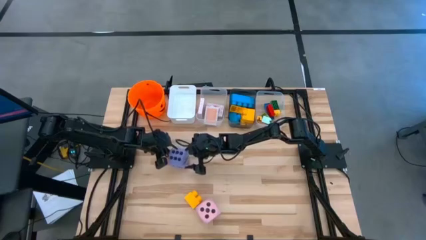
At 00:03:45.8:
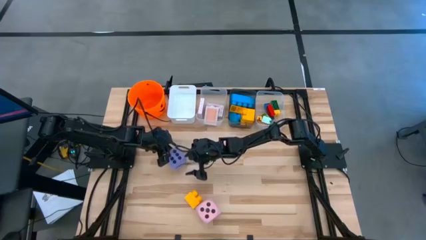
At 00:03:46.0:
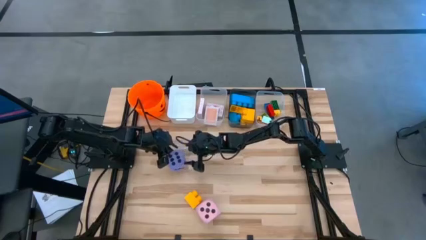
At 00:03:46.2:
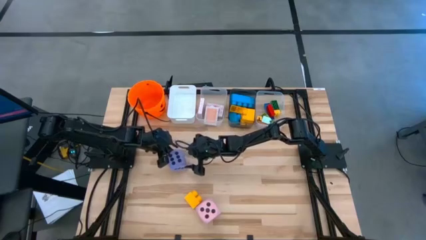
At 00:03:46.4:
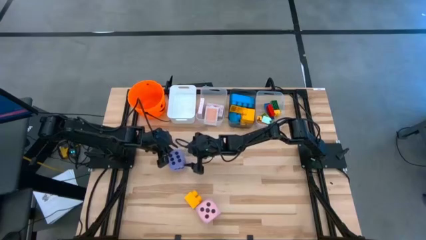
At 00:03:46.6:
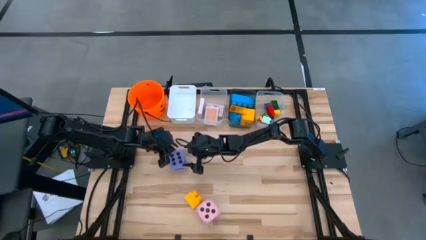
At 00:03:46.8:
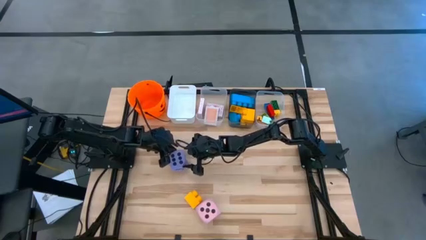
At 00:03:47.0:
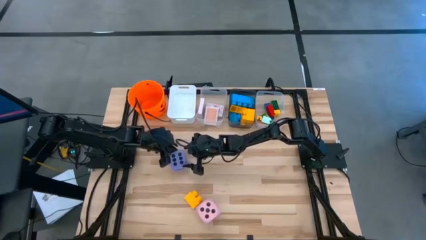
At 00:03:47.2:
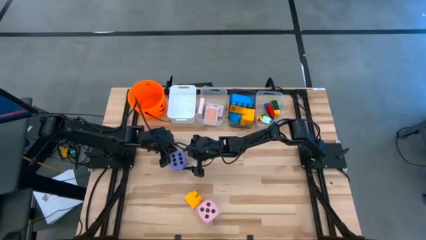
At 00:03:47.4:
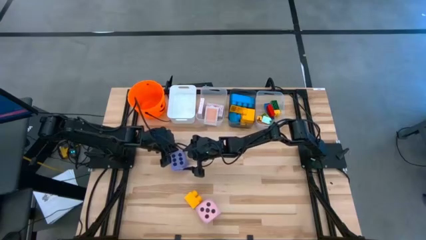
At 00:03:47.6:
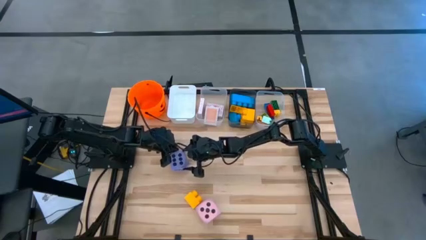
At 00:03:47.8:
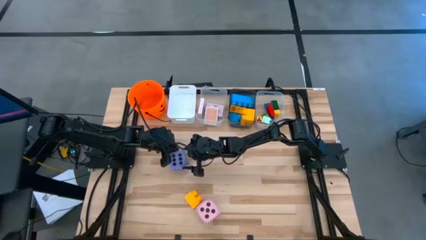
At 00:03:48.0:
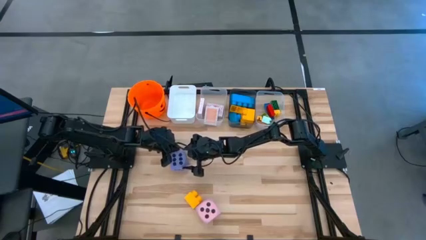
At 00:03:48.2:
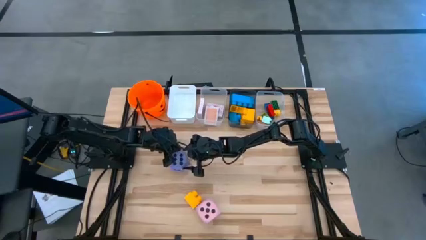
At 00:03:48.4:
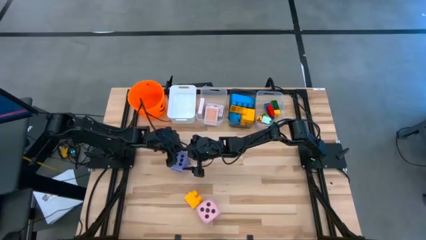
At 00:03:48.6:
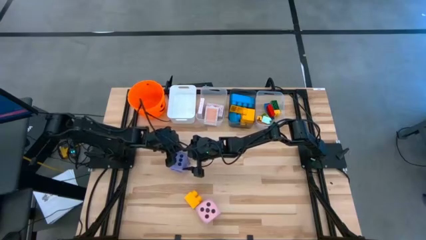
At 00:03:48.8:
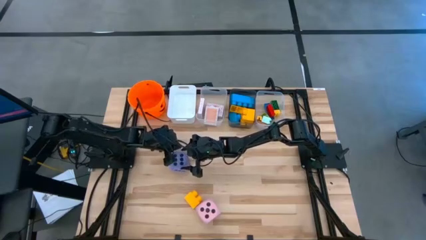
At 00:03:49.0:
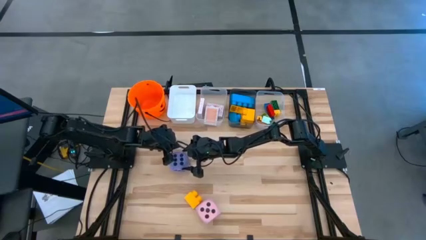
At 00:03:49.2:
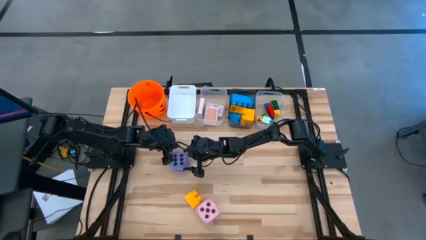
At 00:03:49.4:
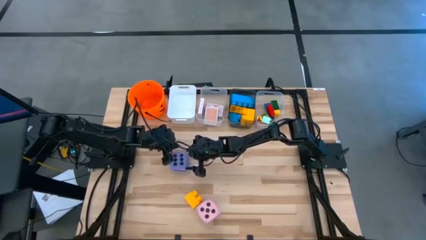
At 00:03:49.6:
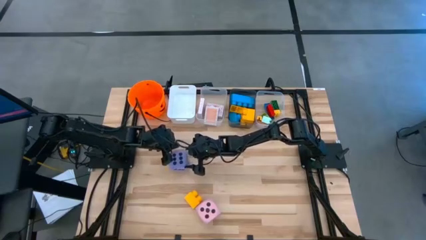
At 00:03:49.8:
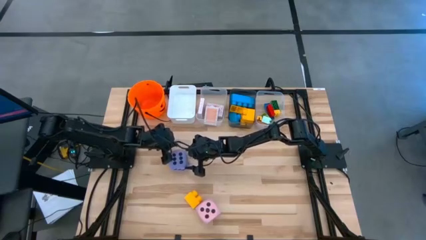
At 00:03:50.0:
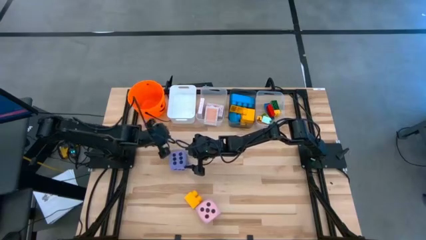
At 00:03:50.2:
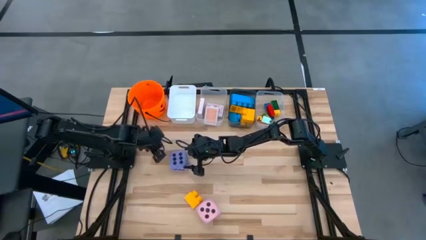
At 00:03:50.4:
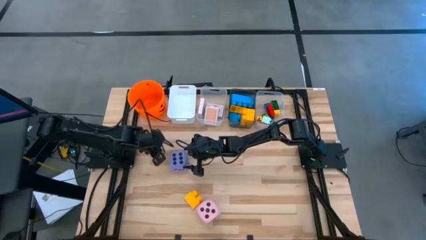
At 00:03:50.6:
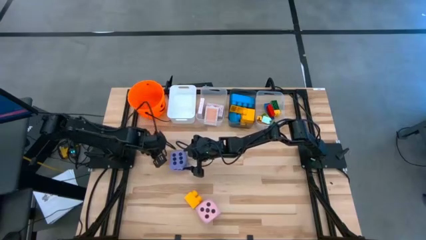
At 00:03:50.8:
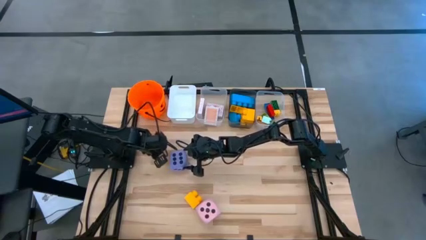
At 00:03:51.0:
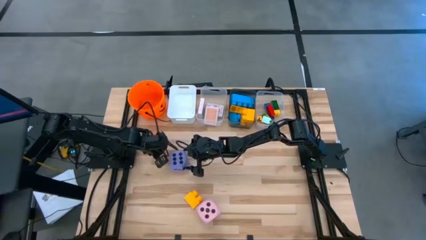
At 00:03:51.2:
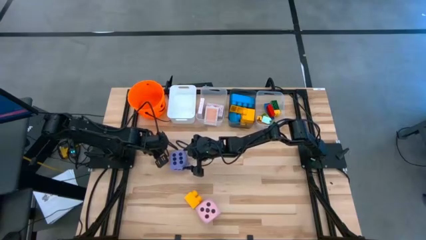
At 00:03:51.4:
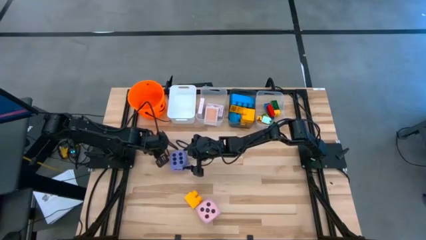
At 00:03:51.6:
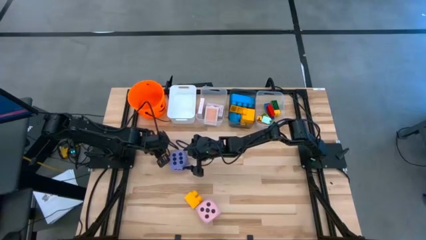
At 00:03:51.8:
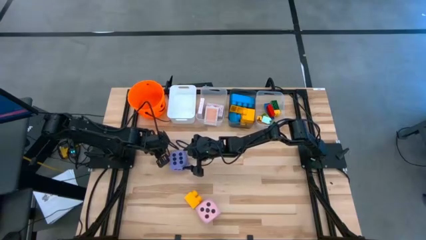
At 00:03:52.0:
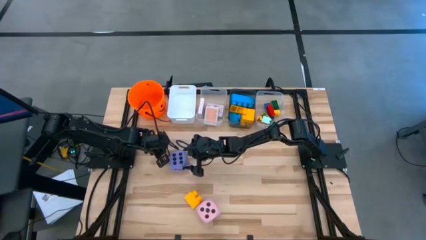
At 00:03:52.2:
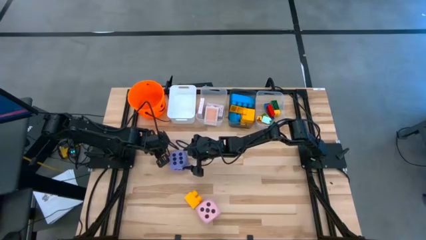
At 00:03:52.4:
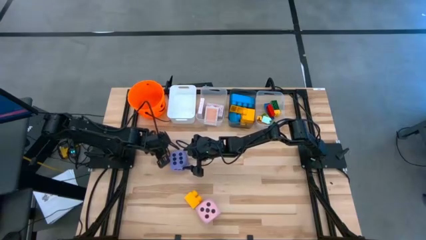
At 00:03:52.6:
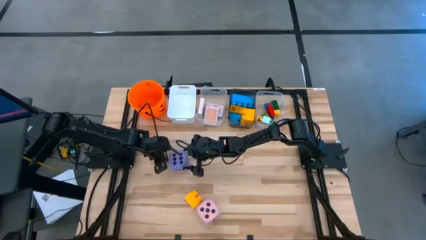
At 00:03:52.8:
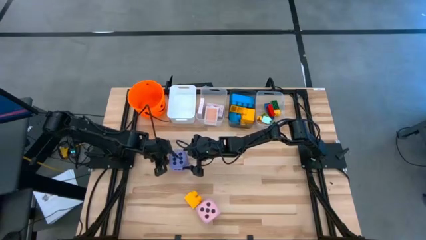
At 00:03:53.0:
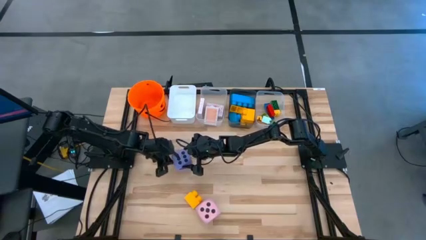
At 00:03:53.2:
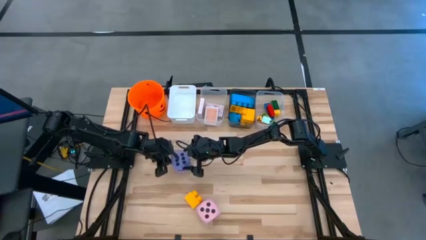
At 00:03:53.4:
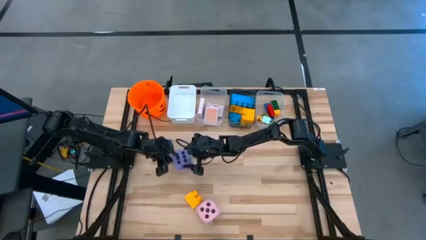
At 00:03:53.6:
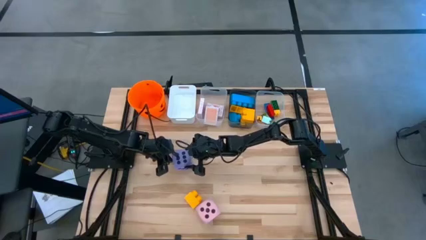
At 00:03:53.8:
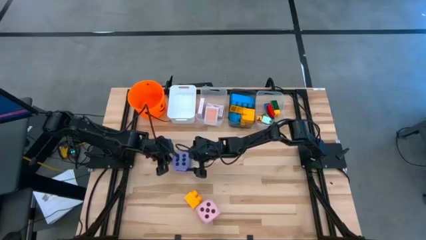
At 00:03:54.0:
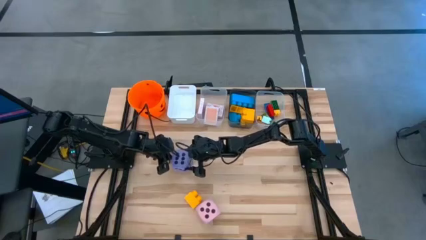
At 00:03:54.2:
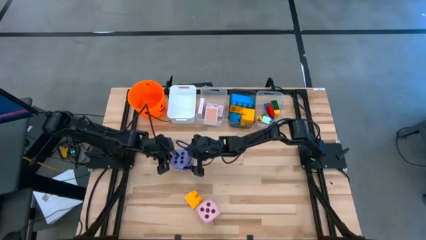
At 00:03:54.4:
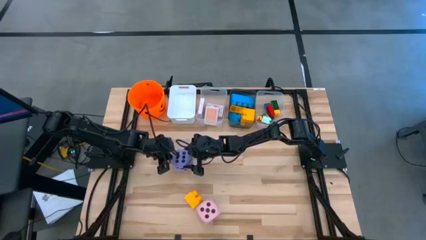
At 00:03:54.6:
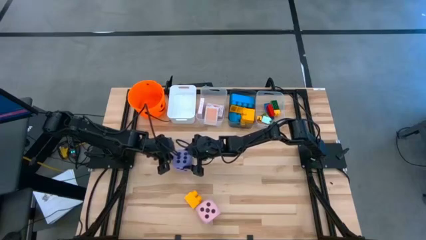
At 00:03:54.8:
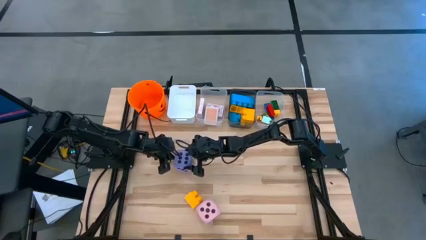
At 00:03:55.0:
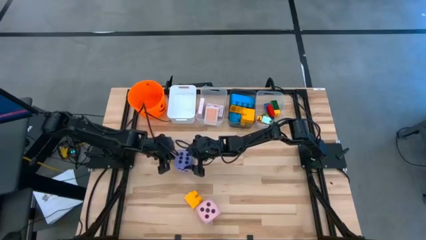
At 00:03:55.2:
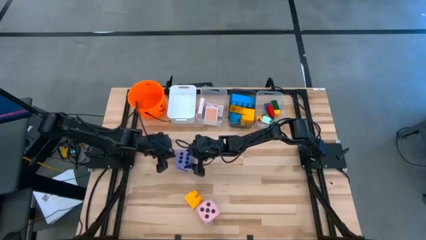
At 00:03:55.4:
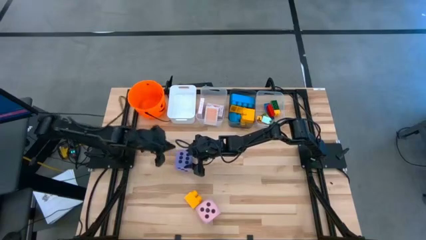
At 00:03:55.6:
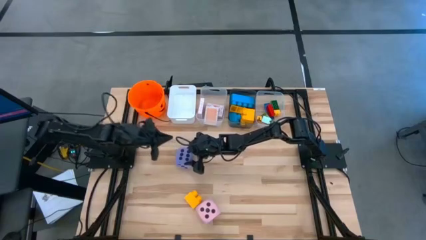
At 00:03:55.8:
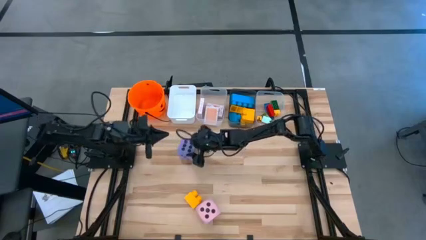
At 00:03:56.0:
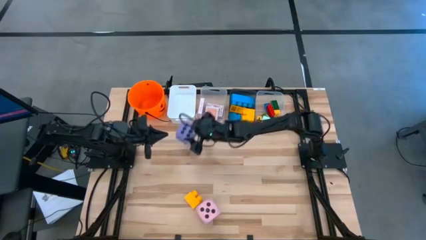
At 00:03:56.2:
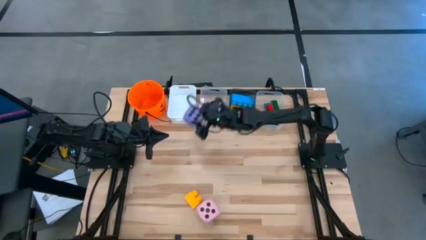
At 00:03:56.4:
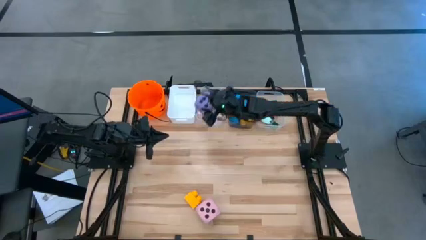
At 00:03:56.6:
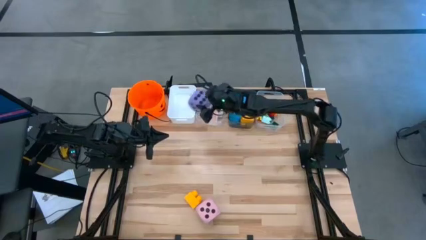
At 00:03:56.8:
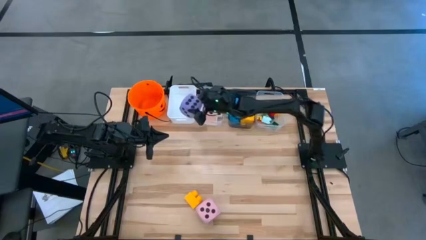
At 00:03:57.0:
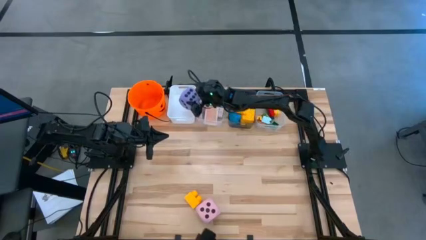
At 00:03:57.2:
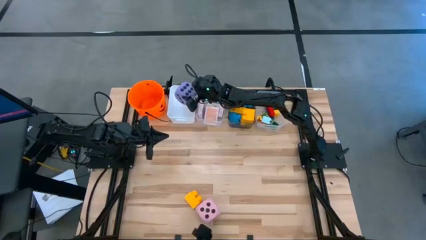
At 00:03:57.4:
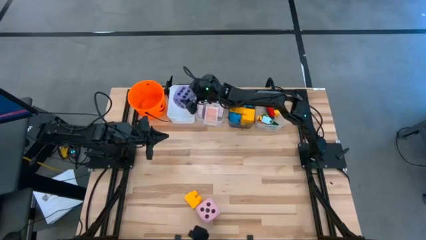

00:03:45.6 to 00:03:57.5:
Task: Pick & Place Toys
Put the purple die into the white bin

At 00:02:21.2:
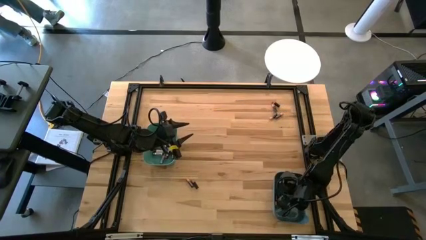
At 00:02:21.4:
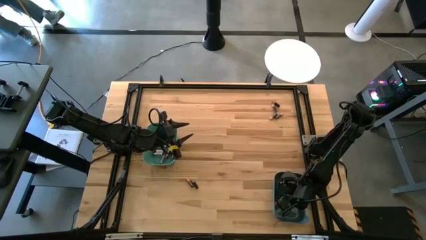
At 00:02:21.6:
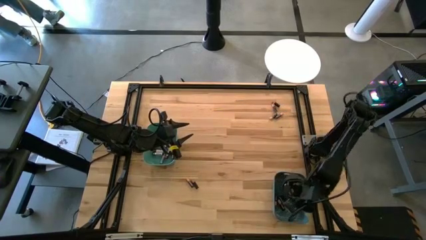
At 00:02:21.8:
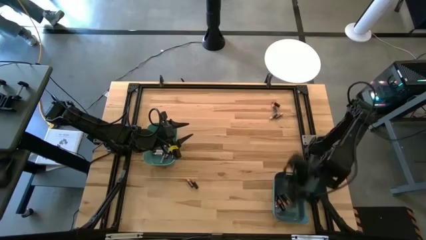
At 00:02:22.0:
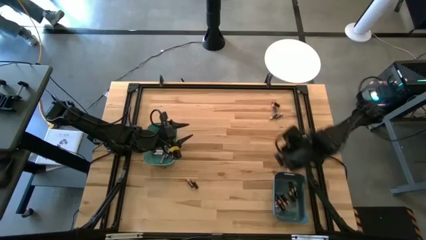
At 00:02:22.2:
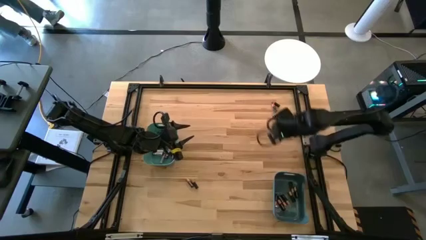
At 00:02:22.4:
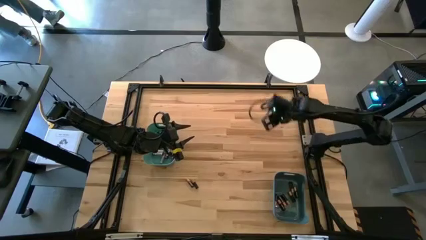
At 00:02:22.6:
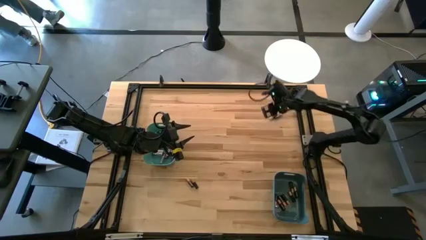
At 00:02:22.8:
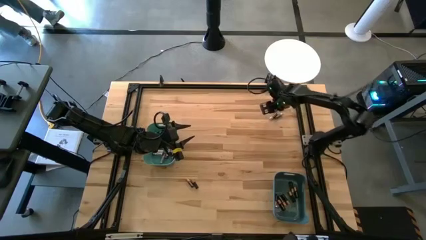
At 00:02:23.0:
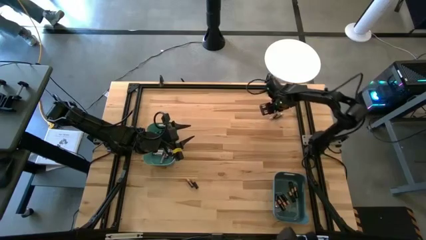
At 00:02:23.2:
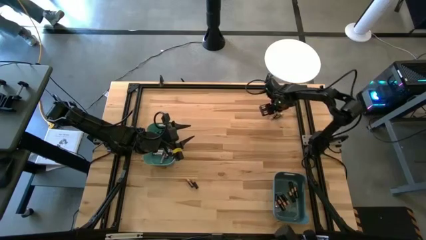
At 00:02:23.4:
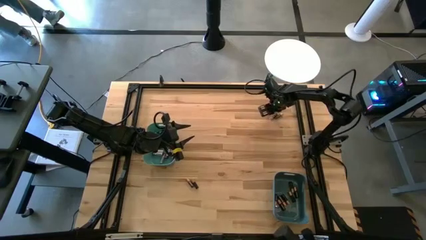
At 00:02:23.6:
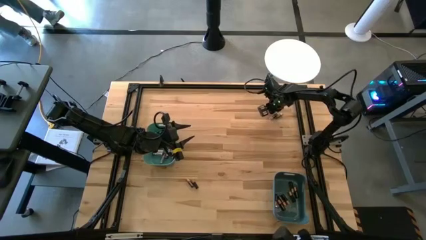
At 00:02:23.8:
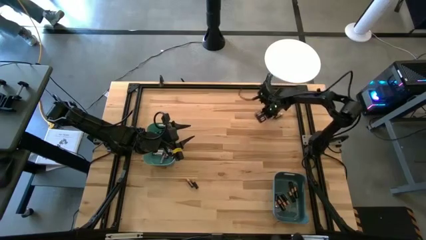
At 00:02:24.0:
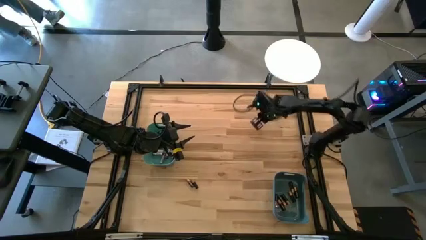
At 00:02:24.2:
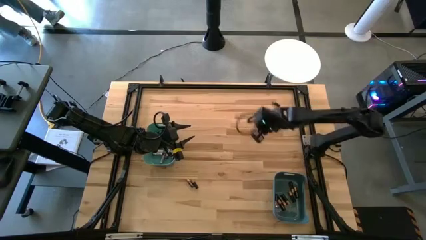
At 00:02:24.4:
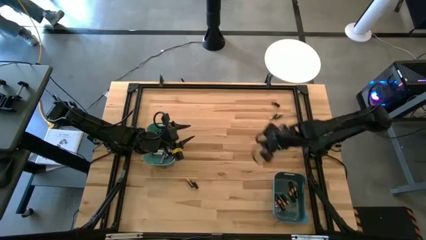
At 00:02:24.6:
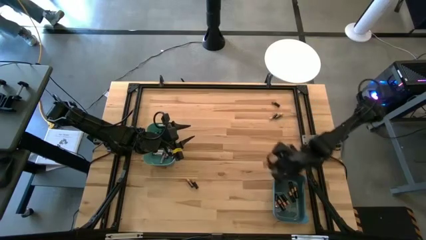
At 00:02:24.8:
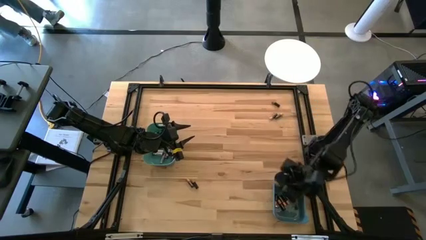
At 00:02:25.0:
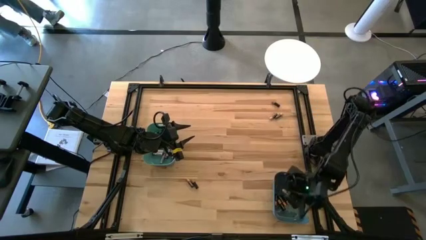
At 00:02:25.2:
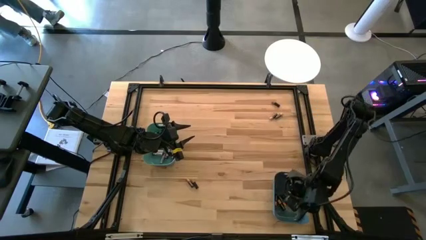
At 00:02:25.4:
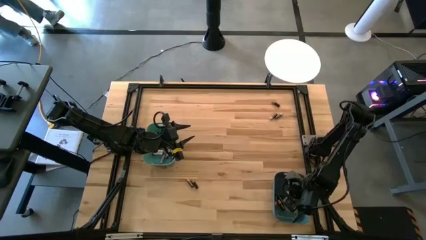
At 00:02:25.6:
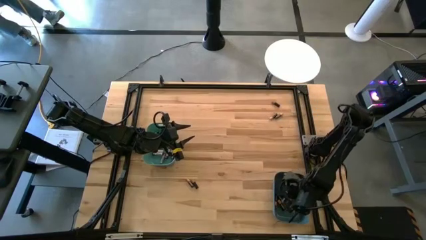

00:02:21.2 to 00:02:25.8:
Task: Sort batteries
Put the black battery into the blue bin
